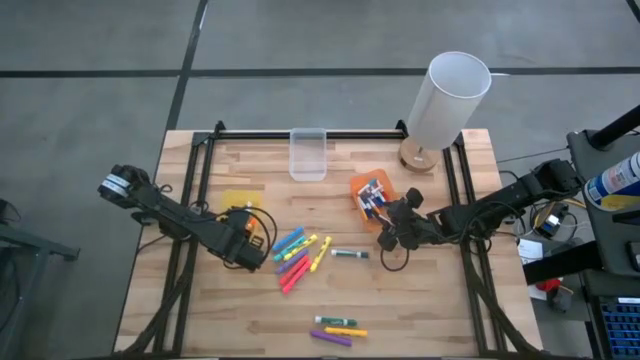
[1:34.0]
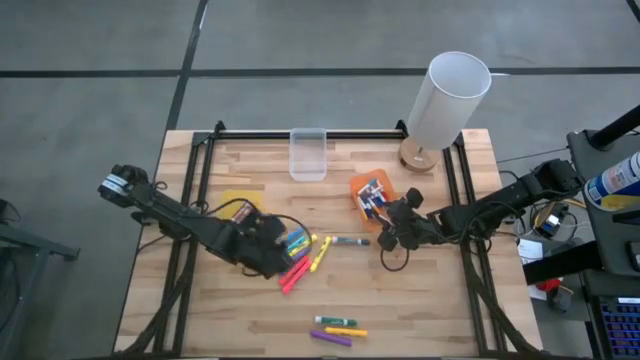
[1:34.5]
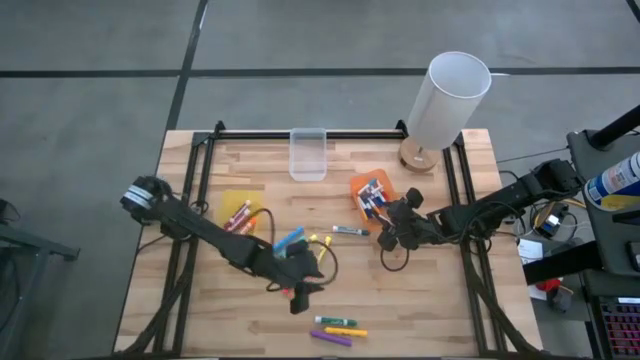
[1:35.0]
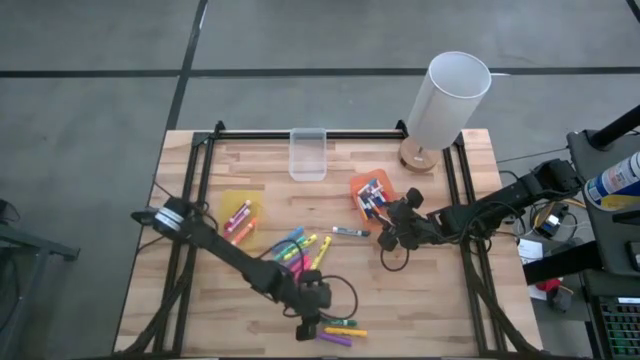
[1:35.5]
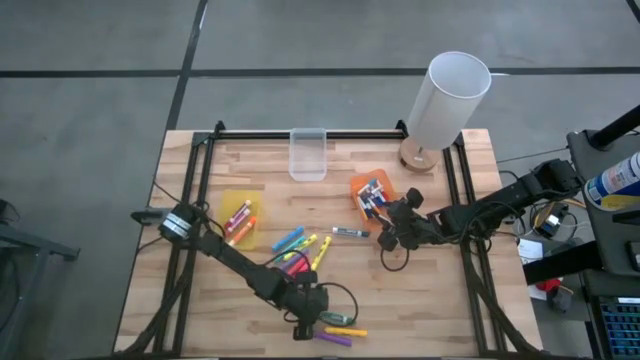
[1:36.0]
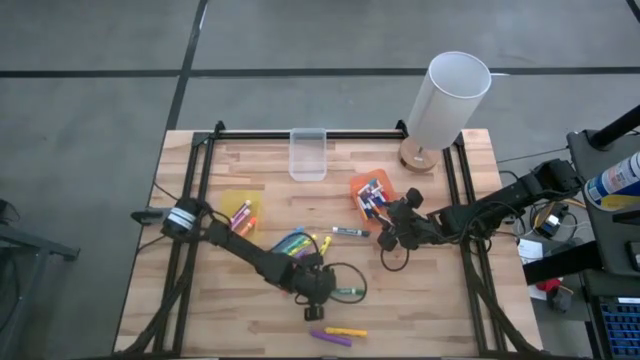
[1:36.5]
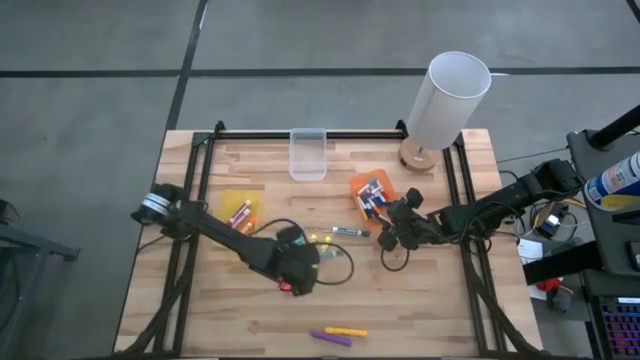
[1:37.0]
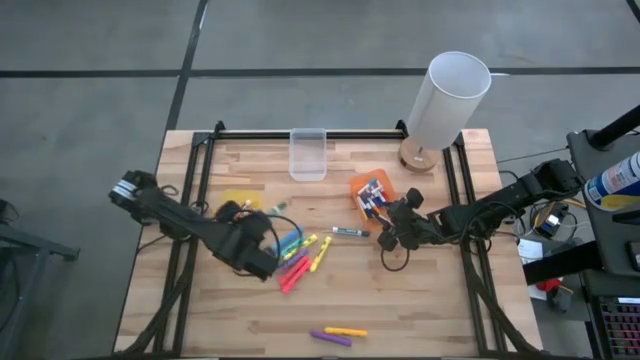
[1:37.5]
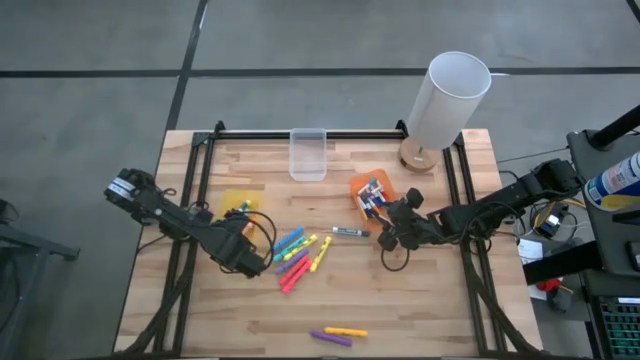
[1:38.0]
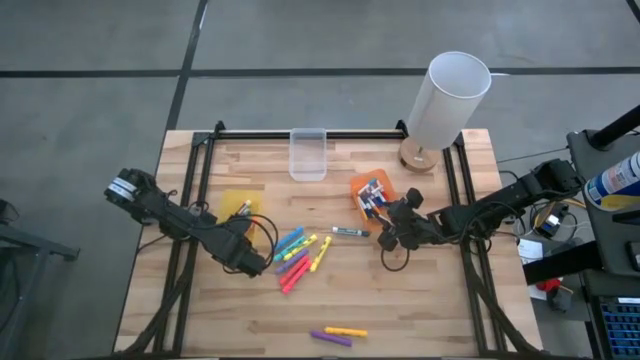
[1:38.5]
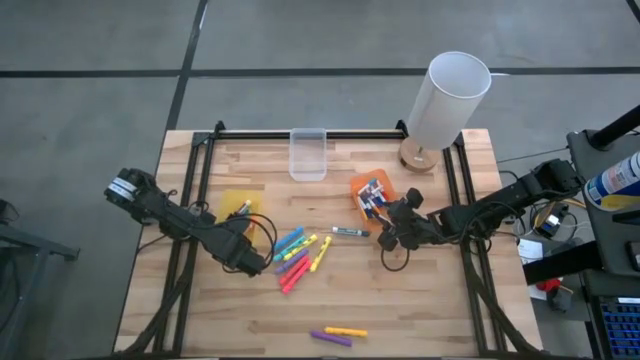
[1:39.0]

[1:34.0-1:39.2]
Task: Pick & Place Markers
Put the big green marker into the yellow bin

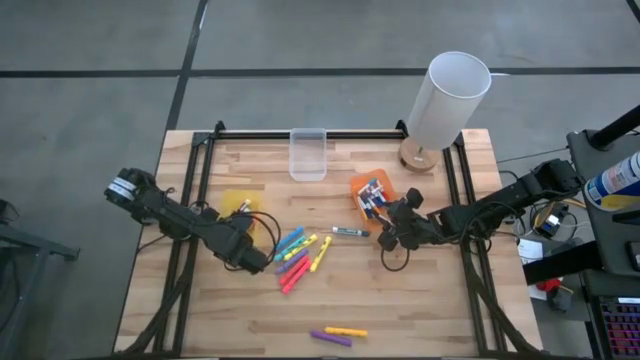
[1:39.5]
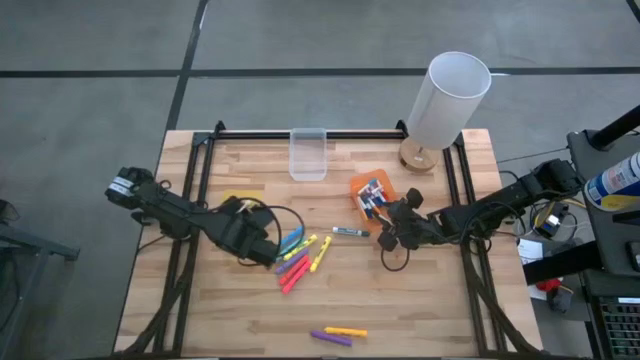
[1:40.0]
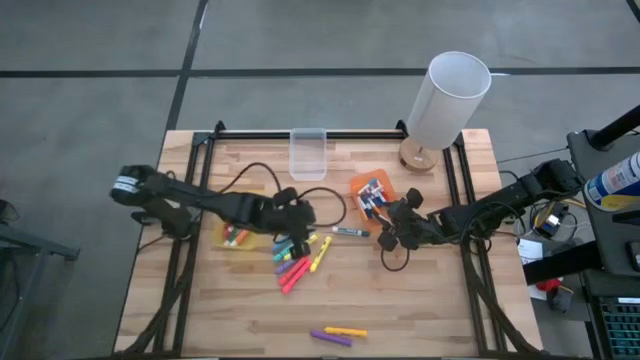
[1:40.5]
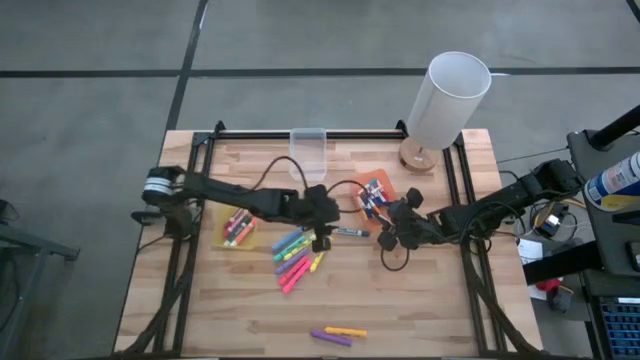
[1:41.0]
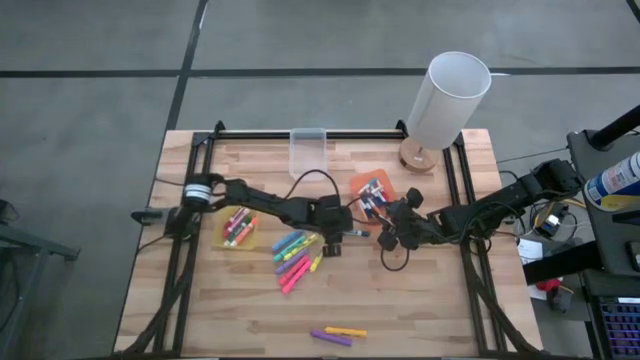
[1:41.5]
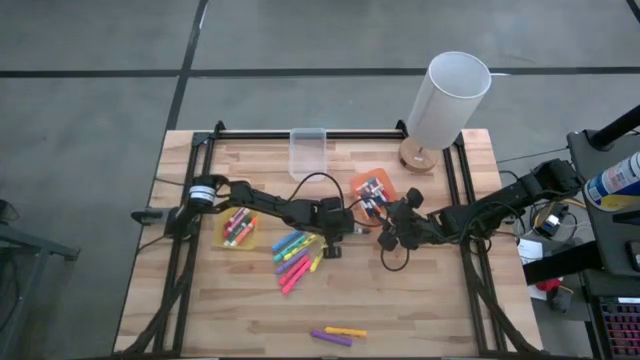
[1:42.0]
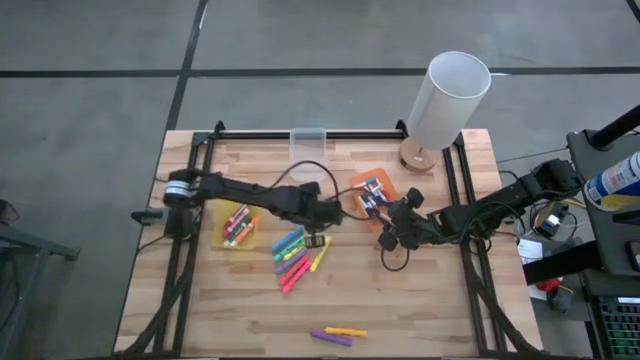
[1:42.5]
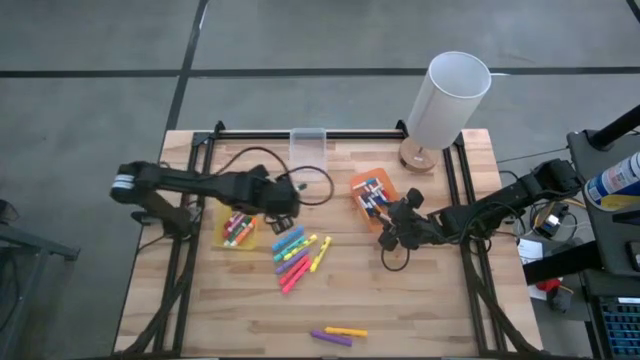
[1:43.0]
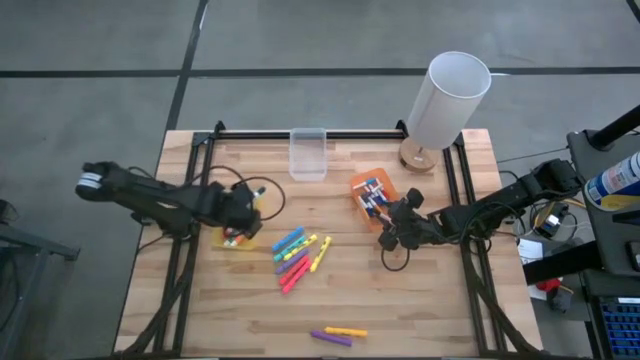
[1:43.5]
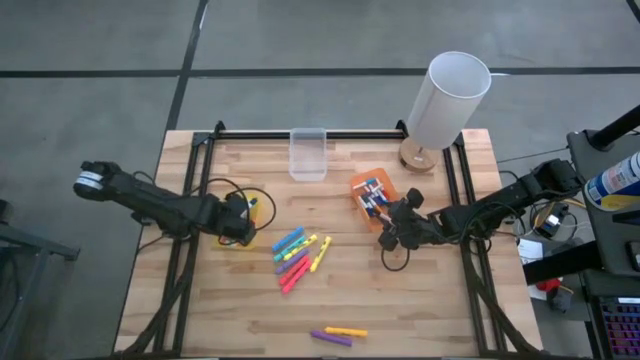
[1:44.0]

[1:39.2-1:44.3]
Put the big dark green marker into the yellow bin

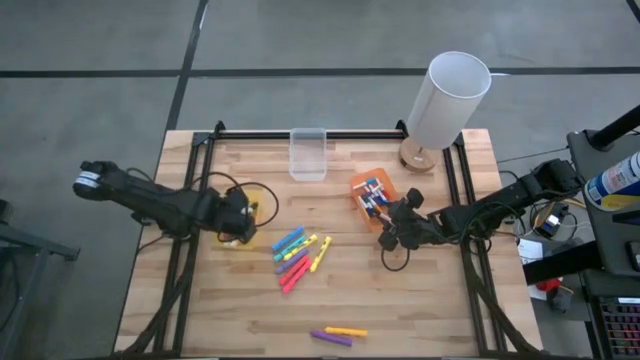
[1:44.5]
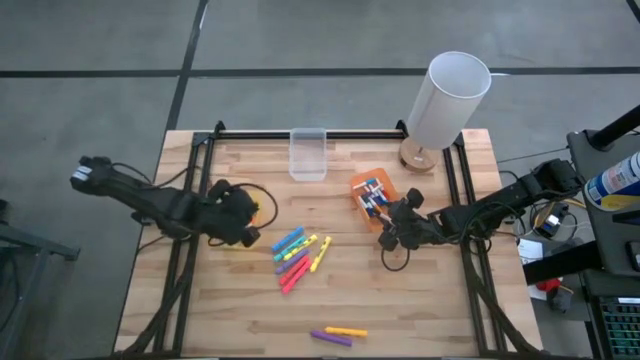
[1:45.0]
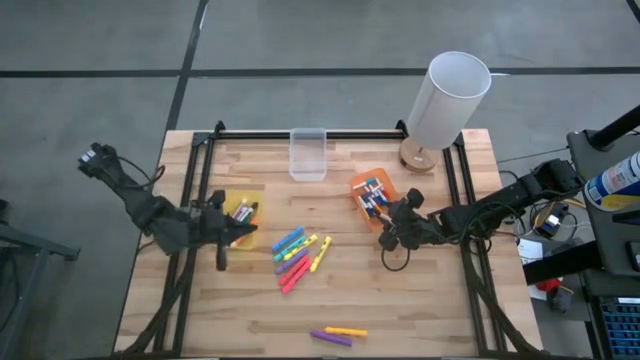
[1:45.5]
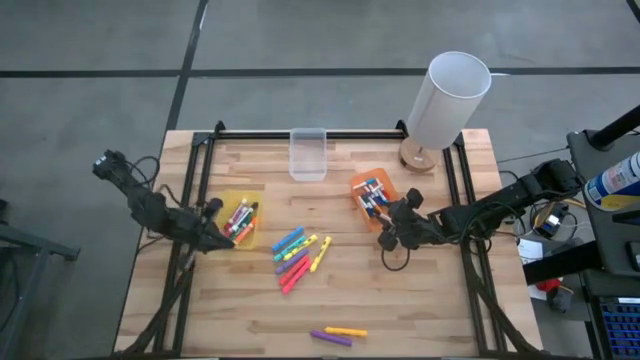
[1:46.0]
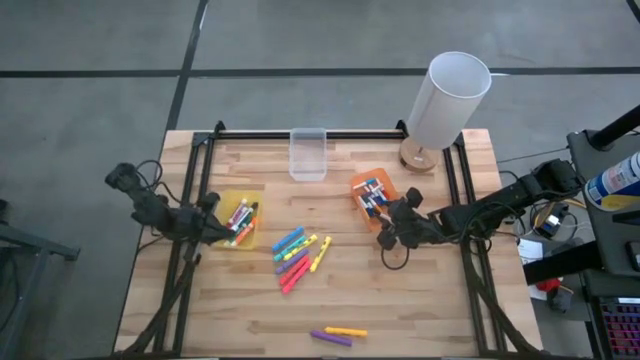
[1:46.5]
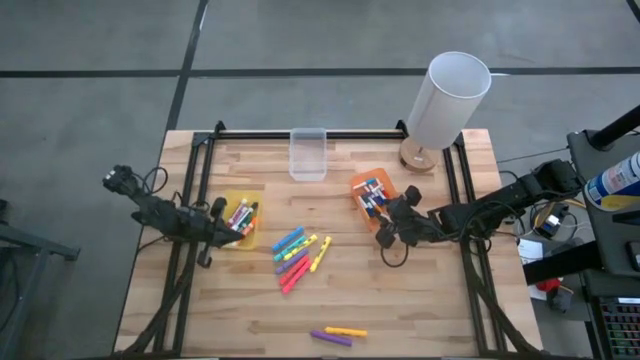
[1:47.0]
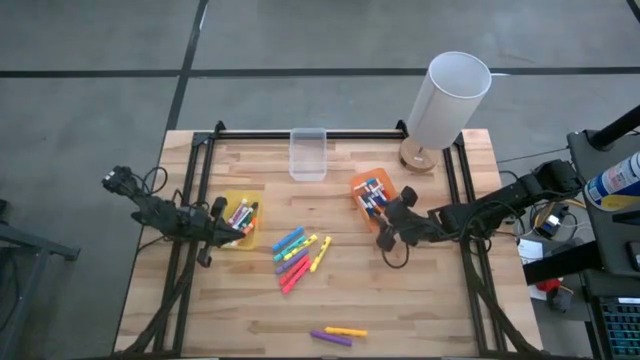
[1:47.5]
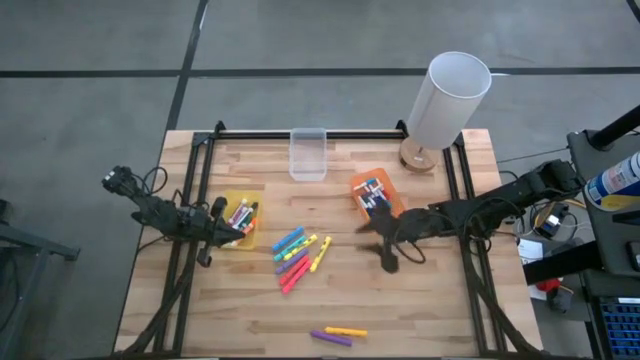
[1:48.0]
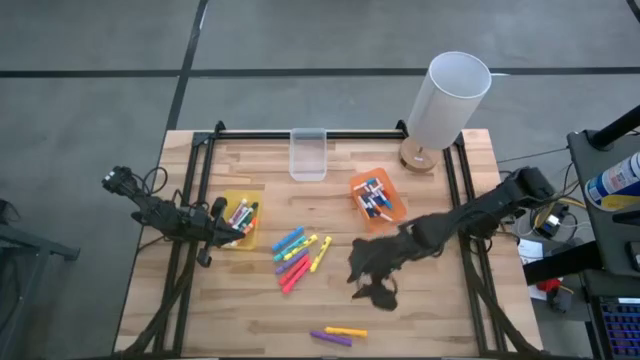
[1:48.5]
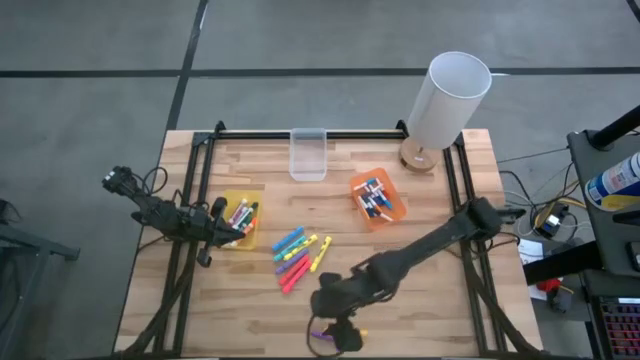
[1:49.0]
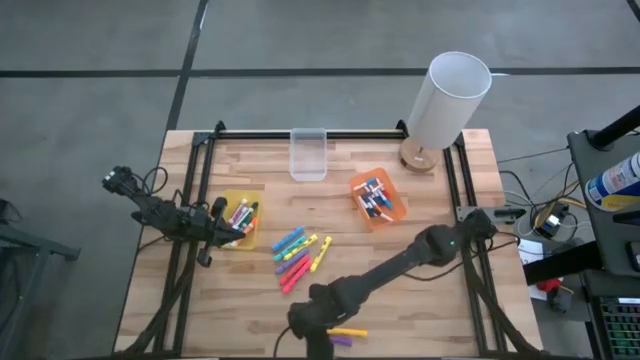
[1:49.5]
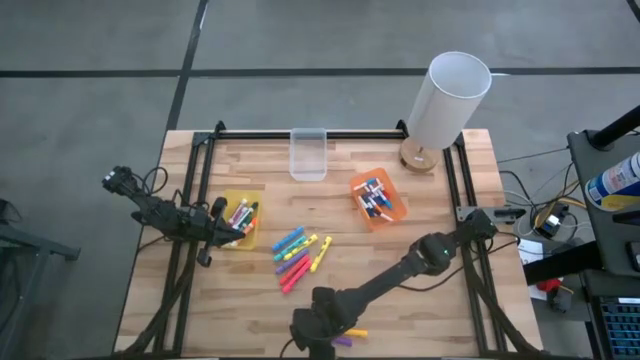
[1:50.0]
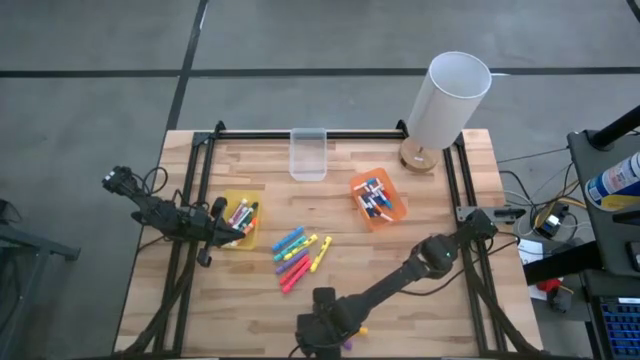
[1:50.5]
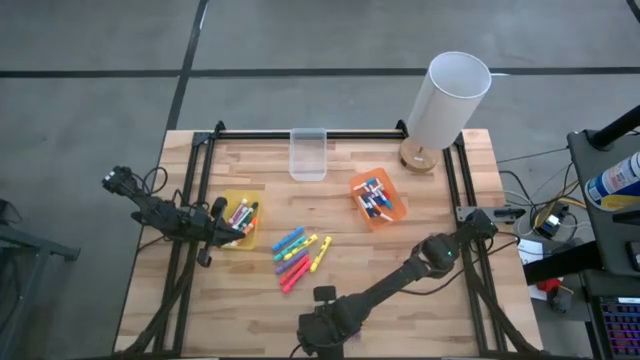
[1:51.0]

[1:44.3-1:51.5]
Put the purple highlighter into the transparent bin

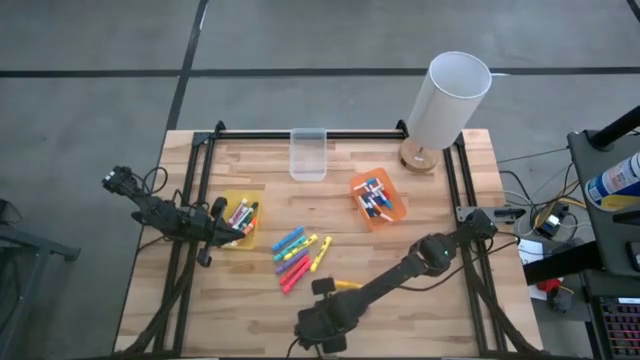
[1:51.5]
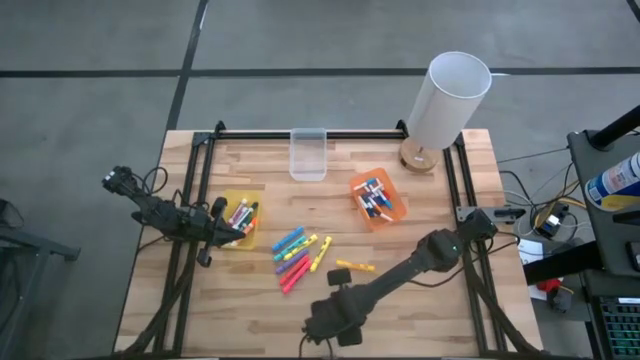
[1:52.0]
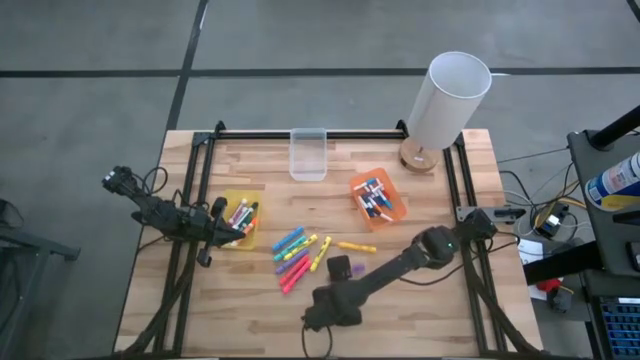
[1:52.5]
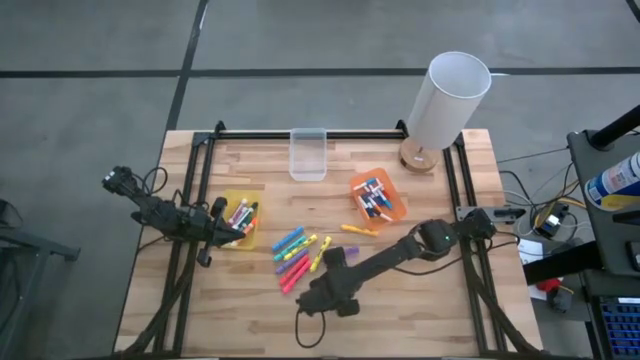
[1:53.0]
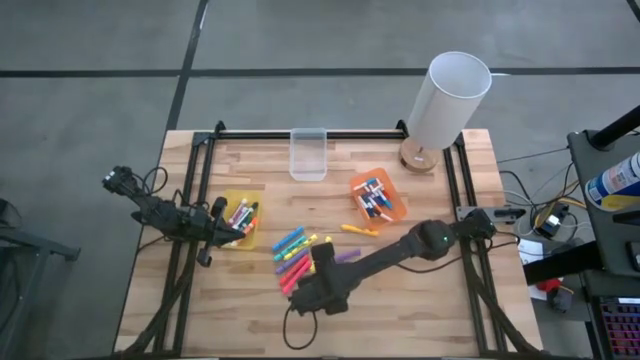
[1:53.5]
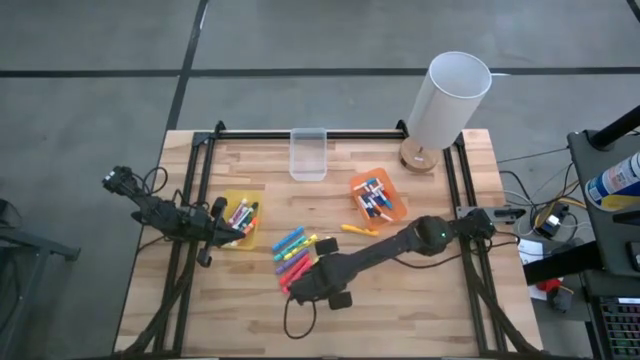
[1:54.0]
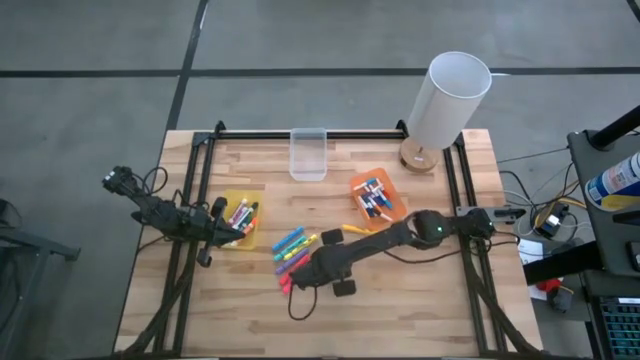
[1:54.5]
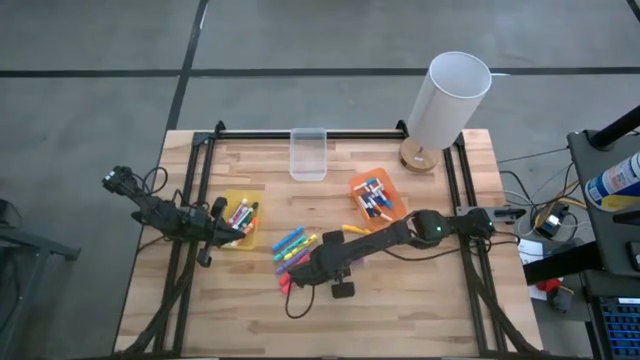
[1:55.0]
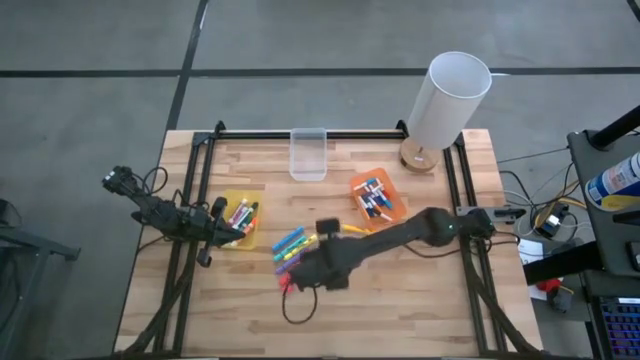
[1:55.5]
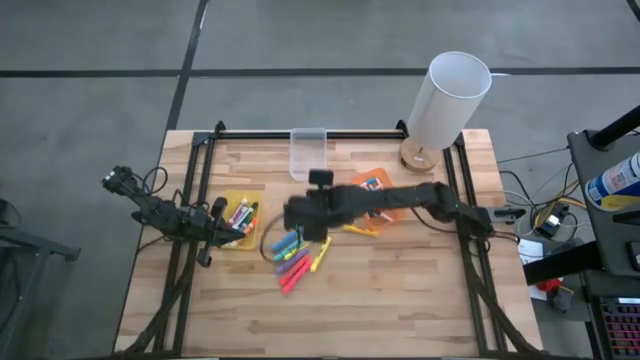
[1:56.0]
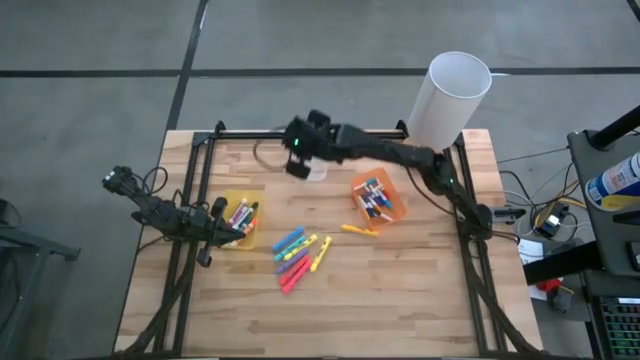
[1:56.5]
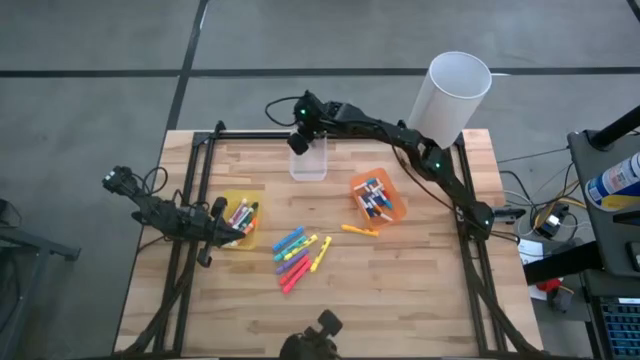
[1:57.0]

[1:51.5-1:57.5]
Put the purple highlighter into the transparent bin
